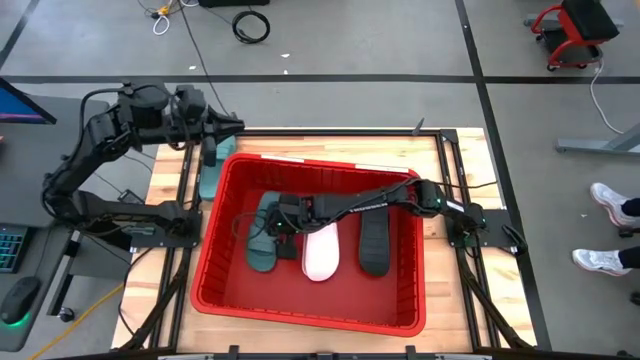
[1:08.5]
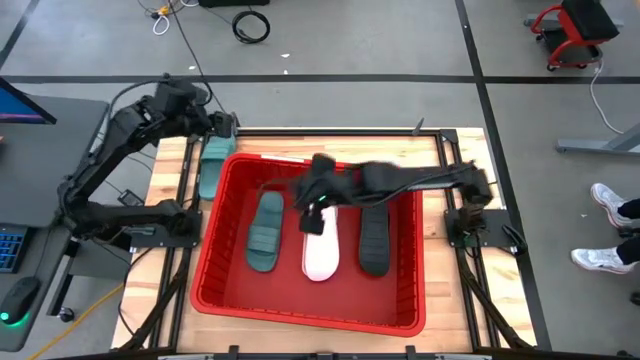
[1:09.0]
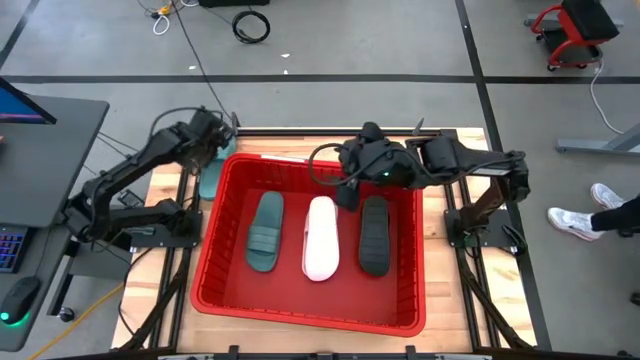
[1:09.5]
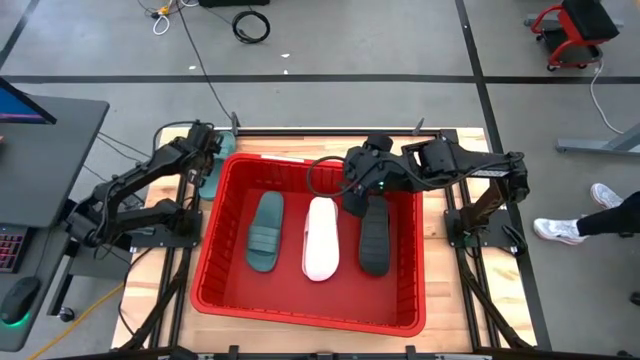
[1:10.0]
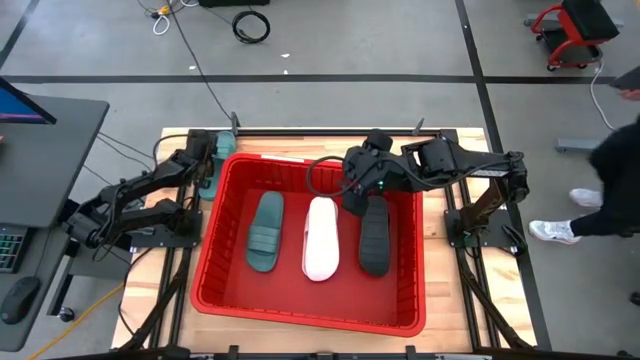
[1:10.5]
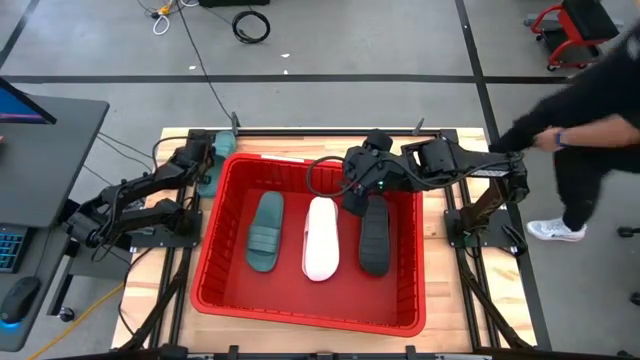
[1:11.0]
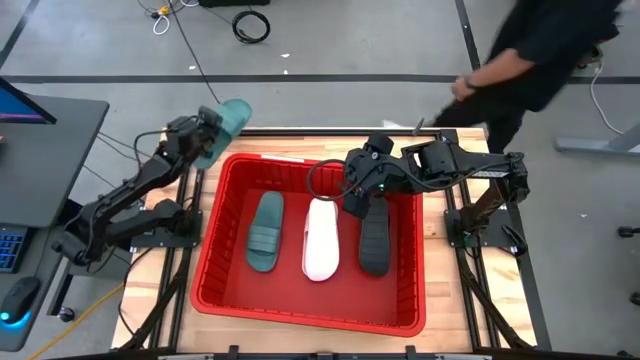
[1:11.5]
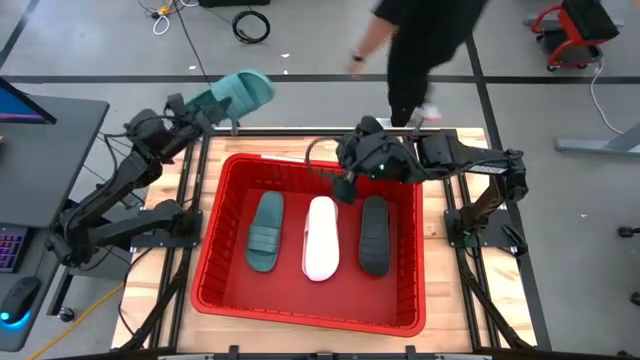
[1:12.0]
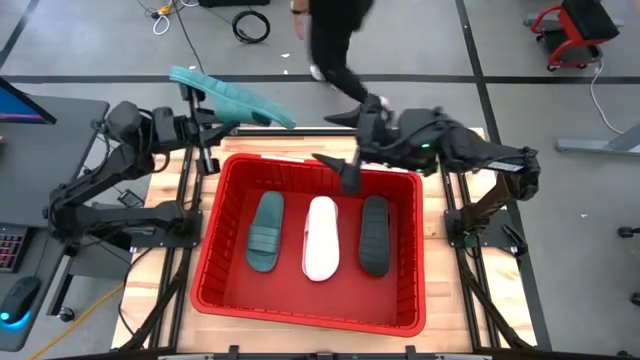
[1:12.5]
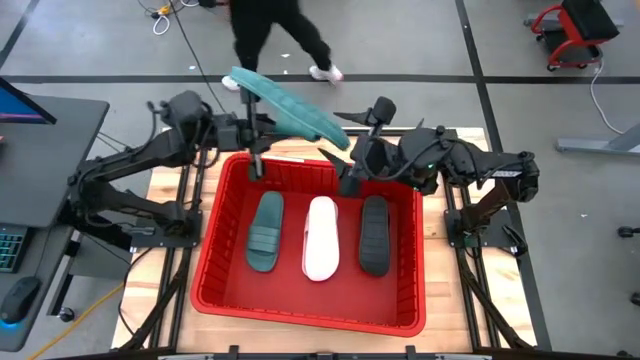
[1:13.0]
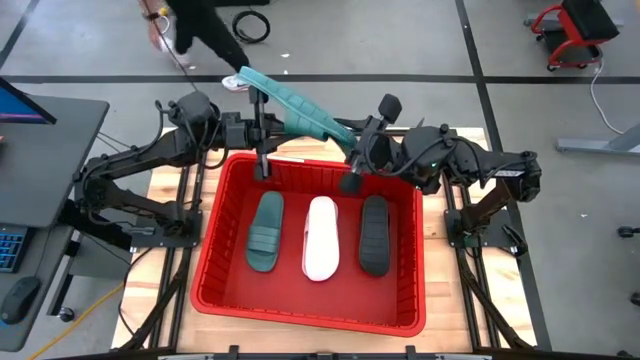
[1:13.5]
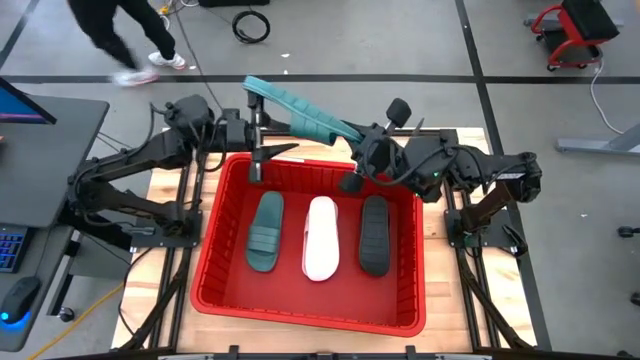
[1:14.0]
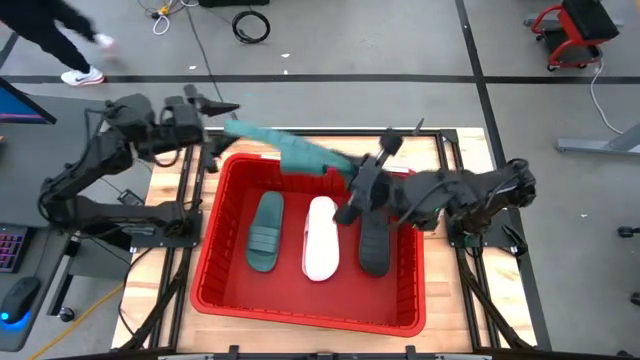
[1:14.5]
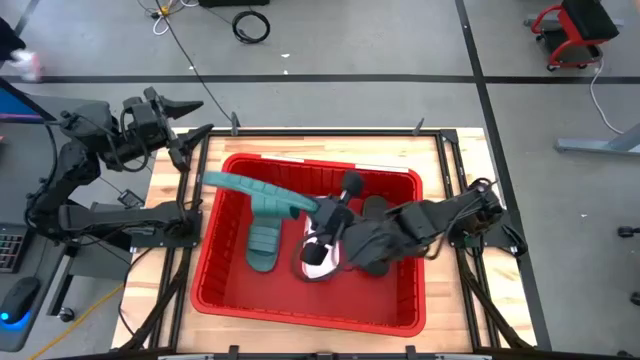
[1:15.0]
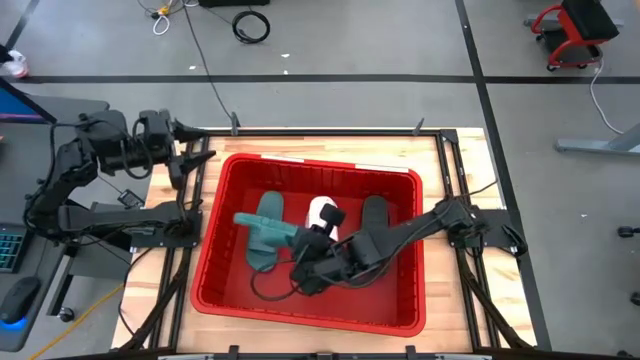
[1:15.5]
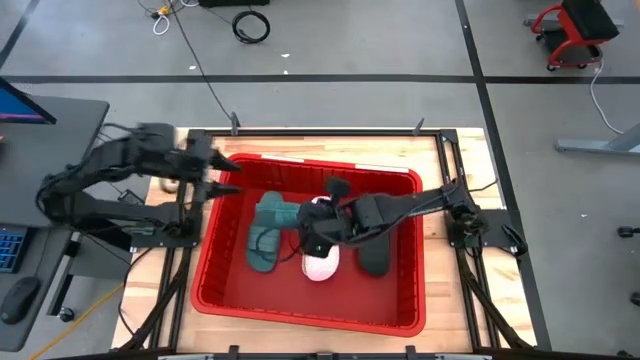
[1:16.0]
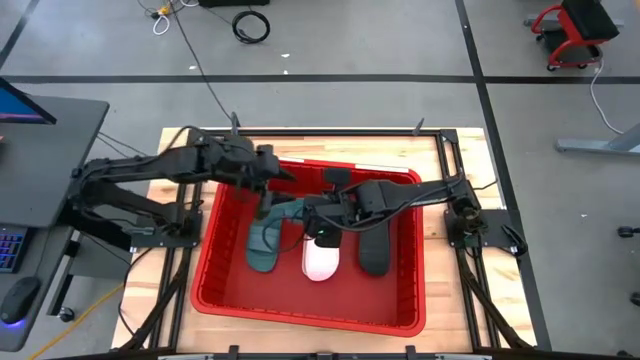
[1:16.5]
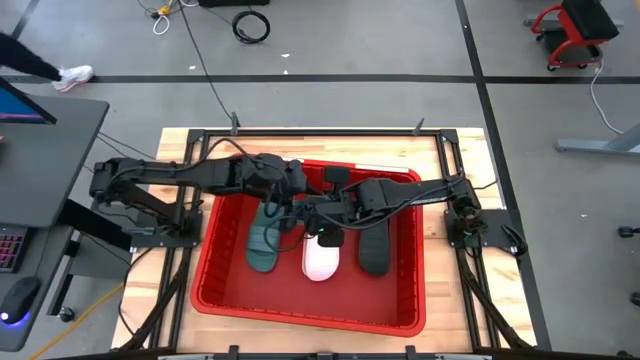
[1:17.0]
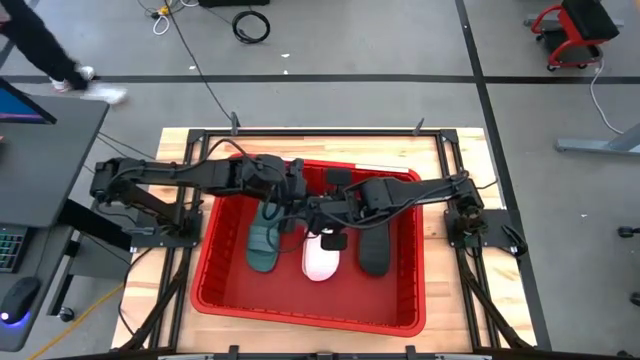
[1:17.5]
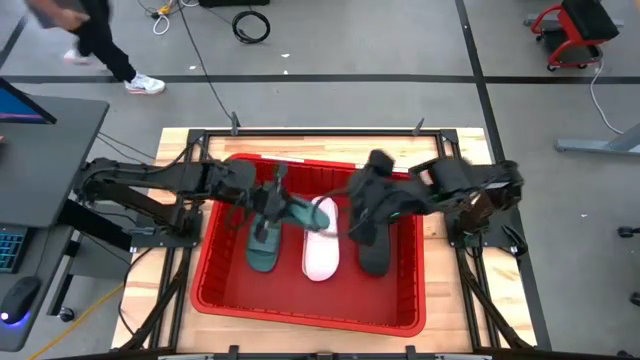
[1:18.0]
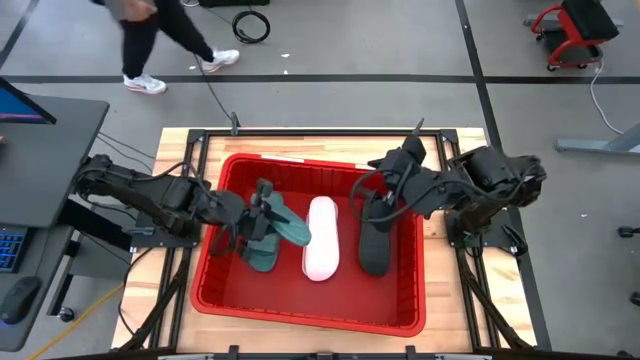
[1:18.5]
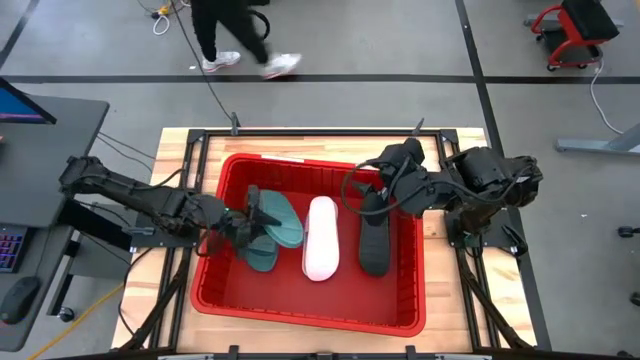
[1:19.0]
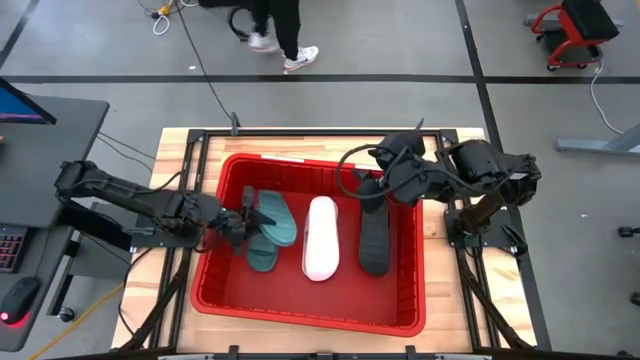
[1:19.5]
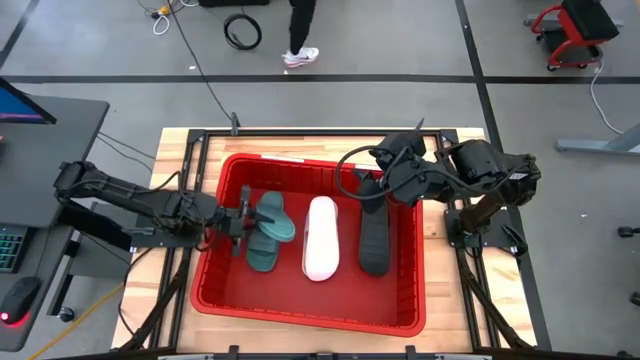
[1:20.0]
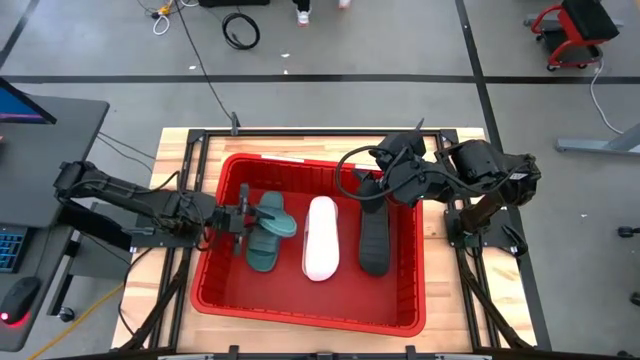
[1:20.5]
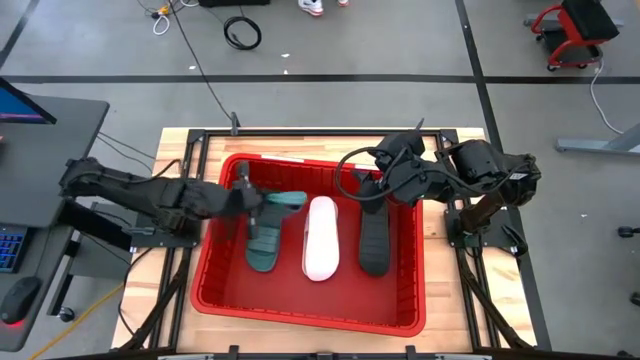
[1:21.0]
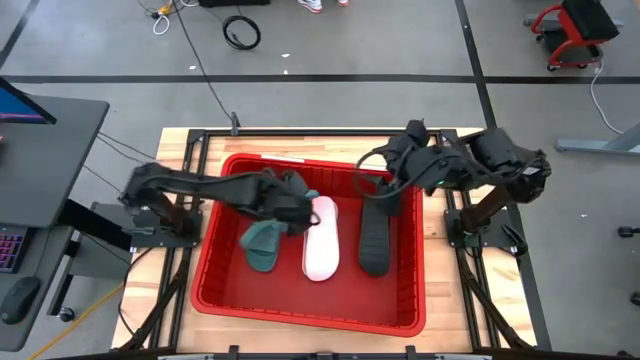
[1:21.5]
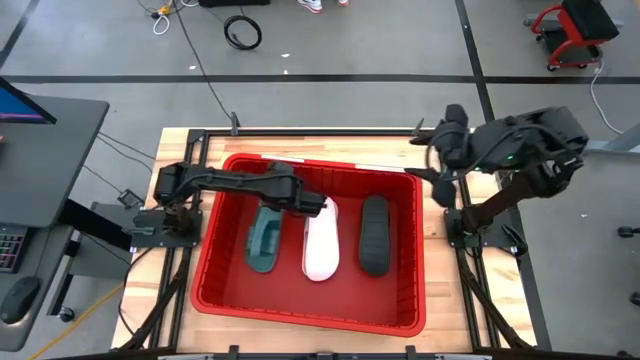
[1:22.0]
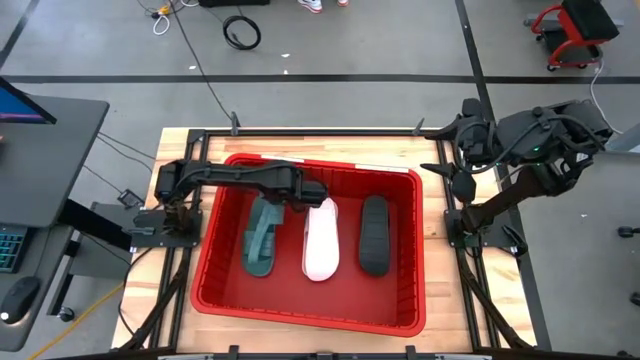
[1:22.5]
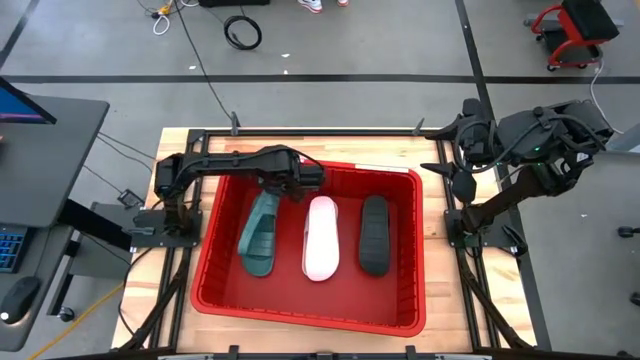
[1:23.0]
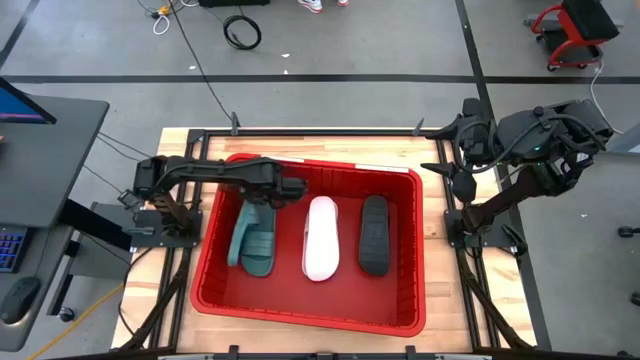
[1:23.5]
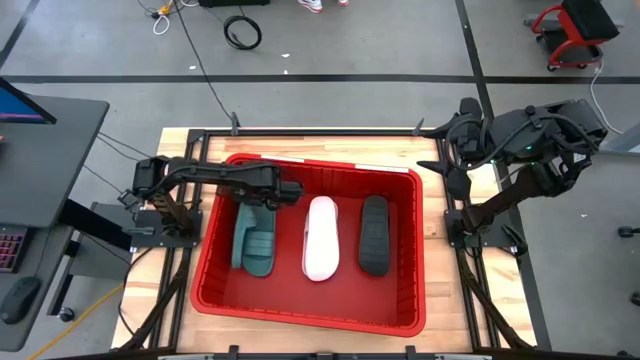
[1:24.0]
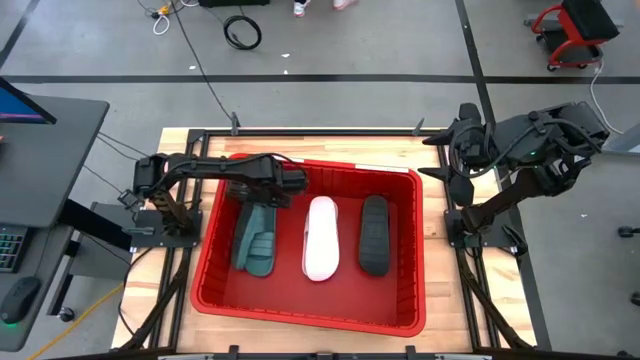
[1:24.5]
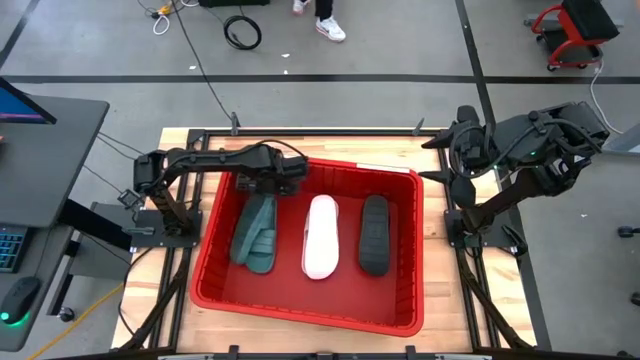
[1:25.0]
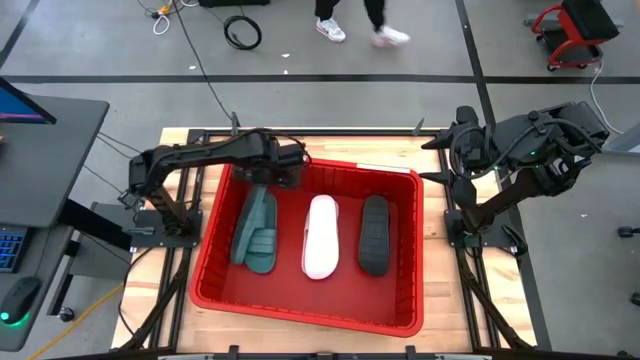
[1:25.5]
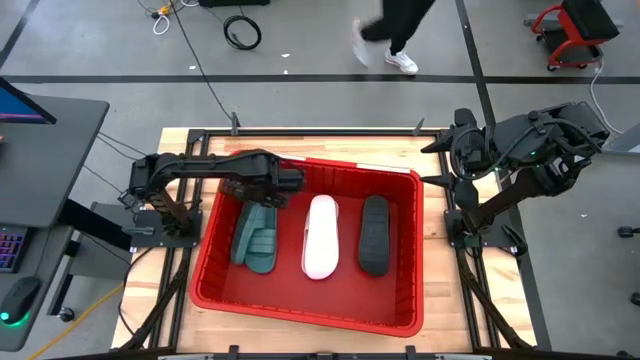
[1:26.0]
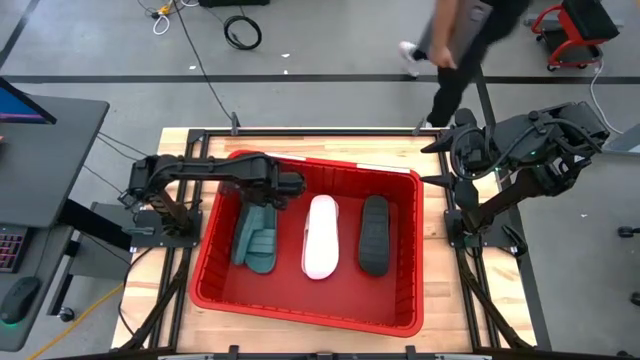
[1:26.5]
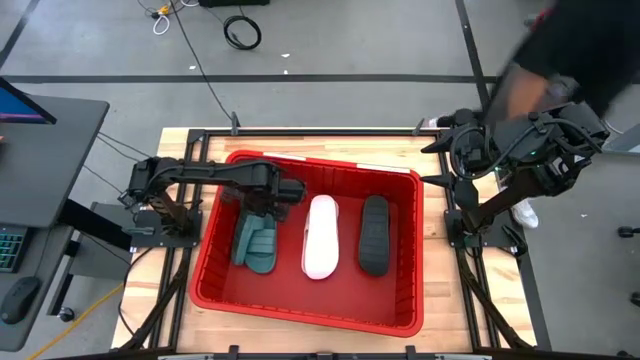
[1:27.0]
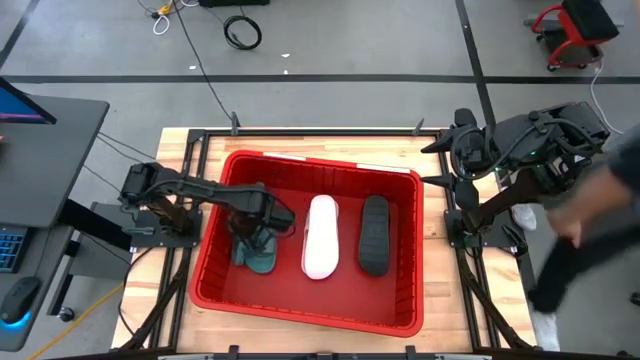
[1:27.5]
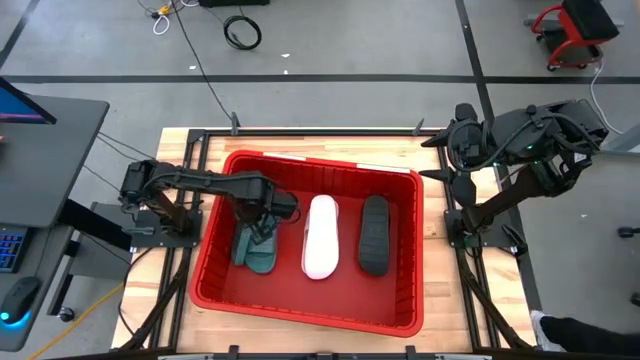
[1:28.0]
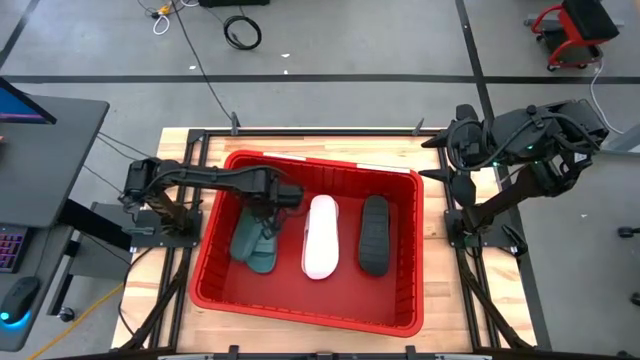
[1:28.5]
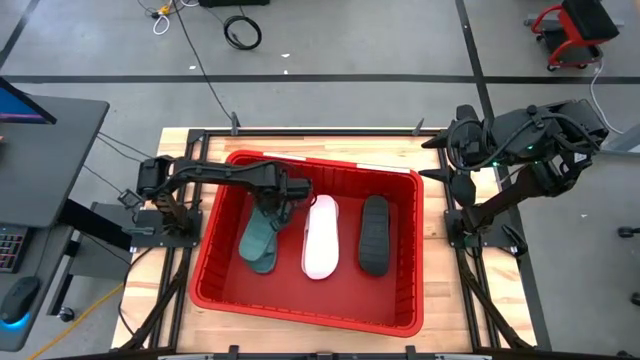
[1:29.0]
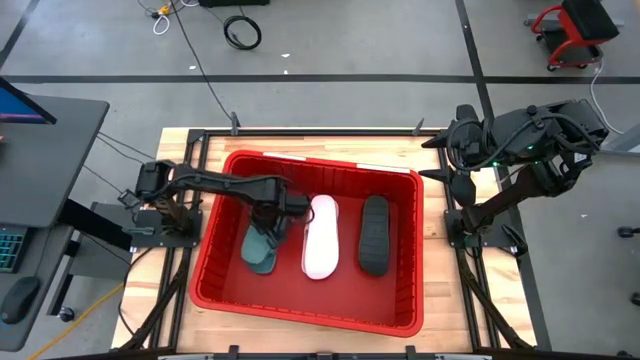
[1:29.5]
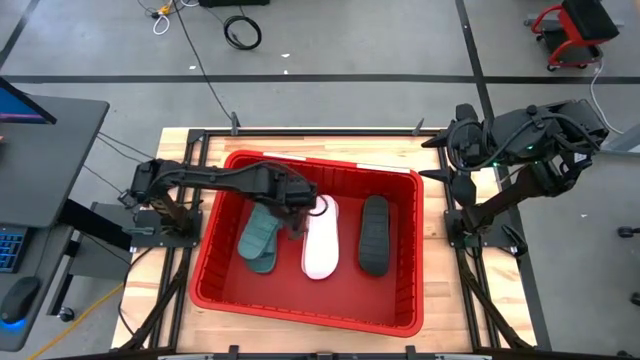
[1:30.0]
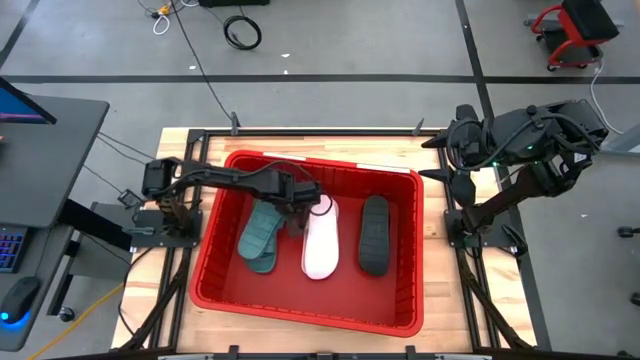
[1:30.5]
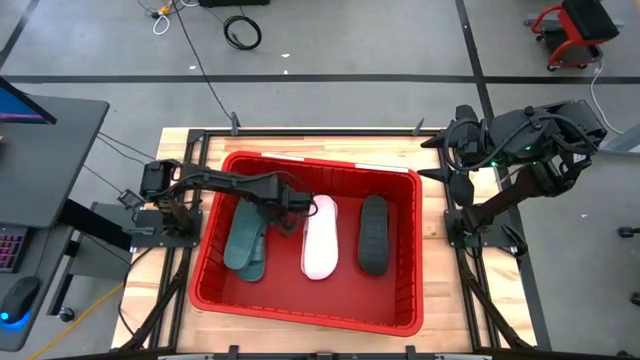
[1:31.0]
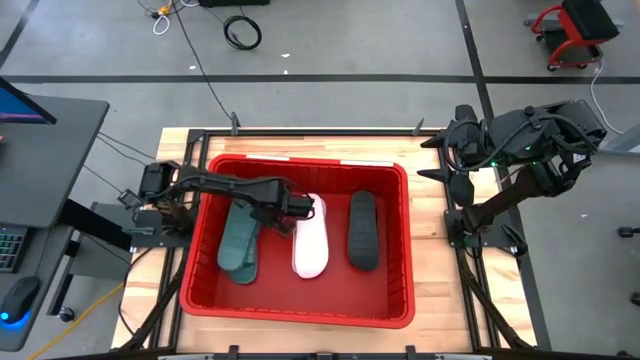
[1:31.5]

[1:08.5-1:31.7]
Task: Pick and place slides into bin
Stack the green slide on top of the green slide in the red bin
